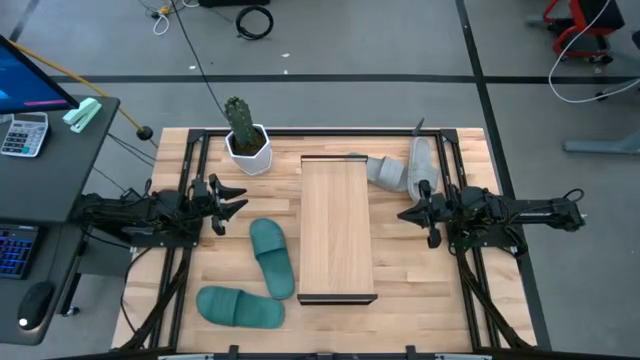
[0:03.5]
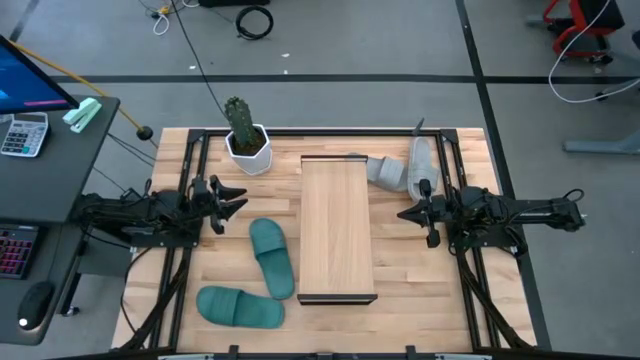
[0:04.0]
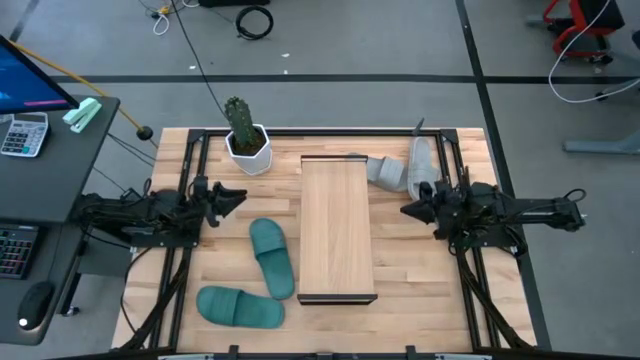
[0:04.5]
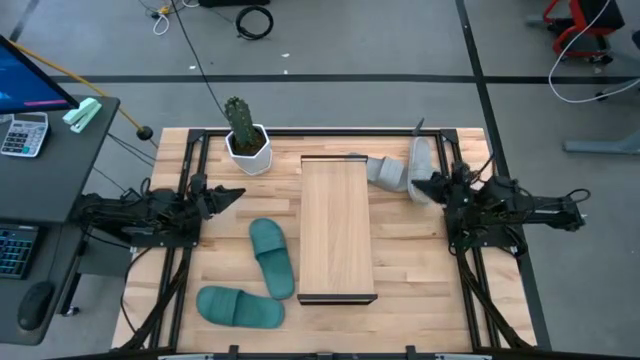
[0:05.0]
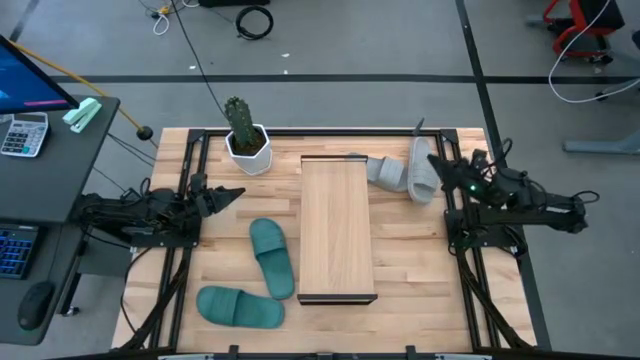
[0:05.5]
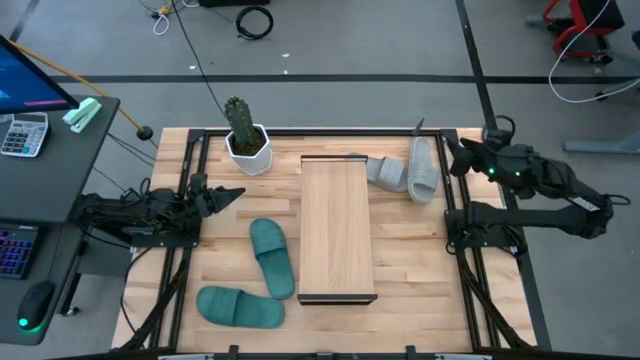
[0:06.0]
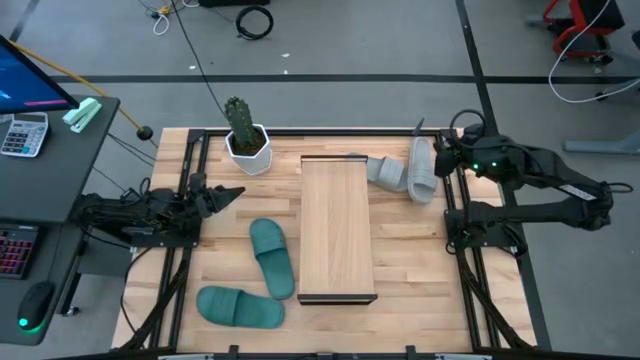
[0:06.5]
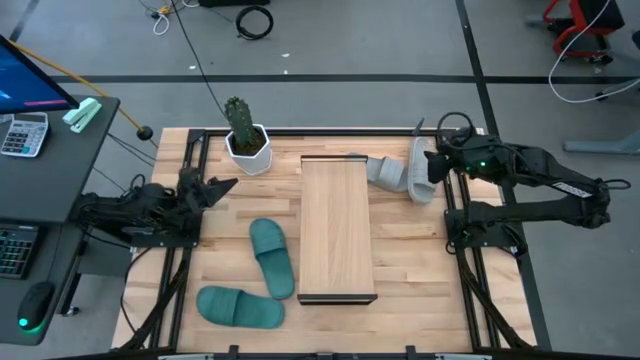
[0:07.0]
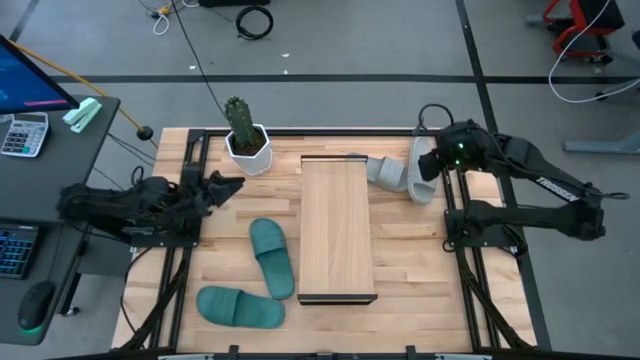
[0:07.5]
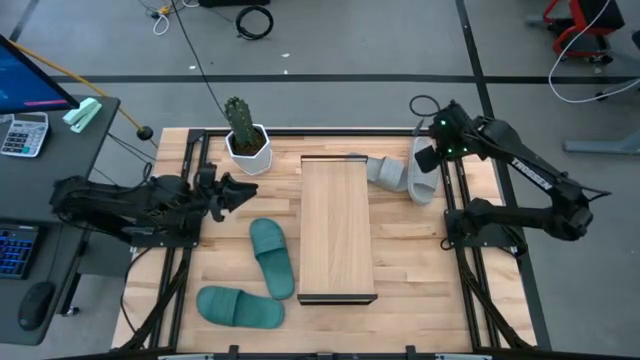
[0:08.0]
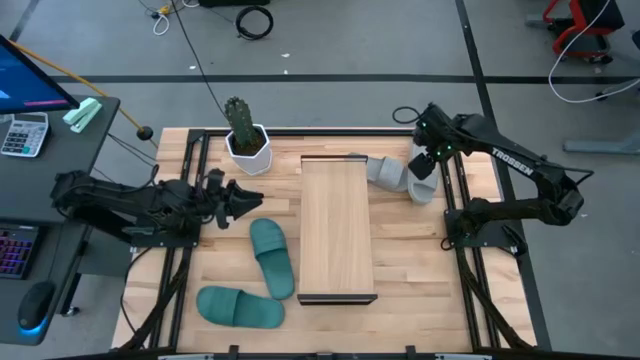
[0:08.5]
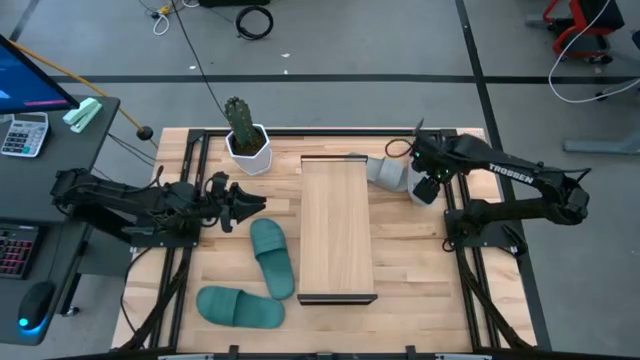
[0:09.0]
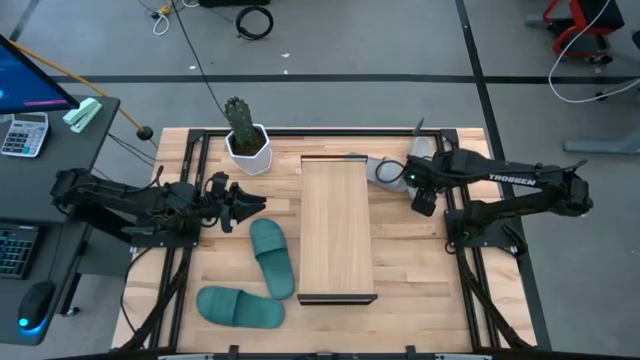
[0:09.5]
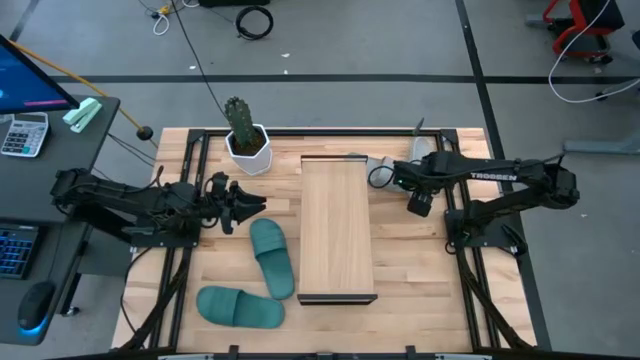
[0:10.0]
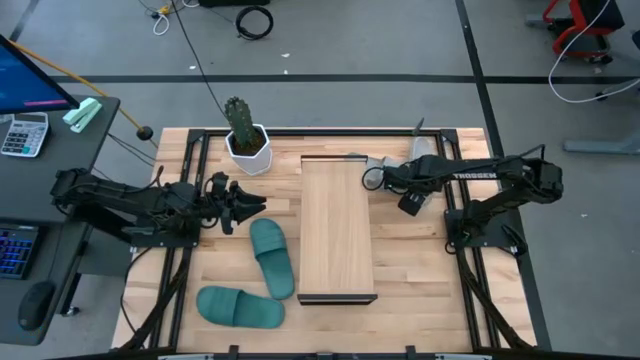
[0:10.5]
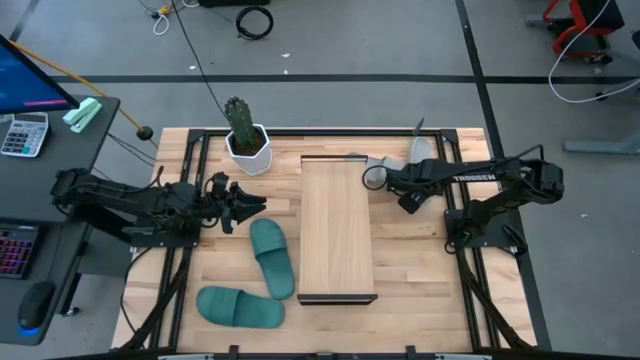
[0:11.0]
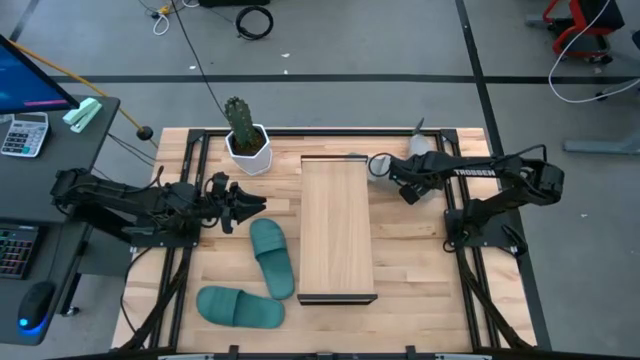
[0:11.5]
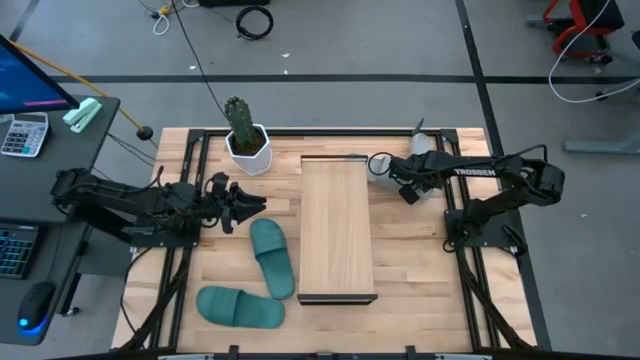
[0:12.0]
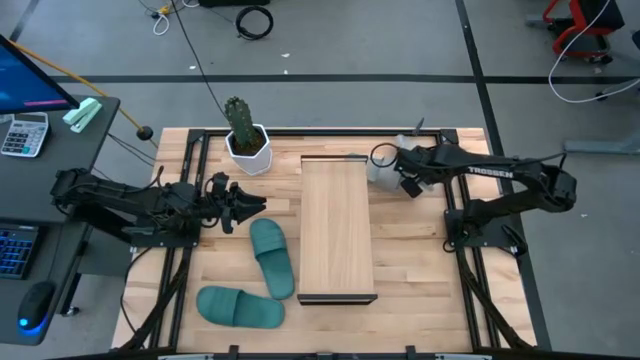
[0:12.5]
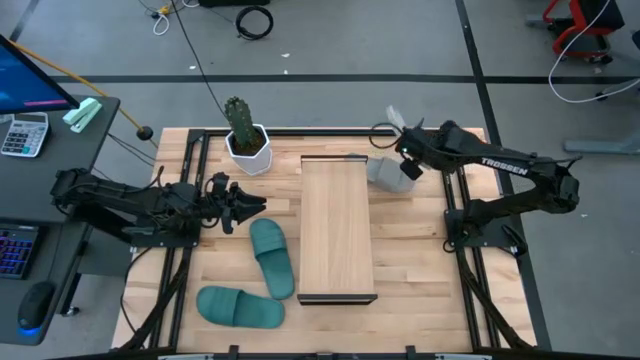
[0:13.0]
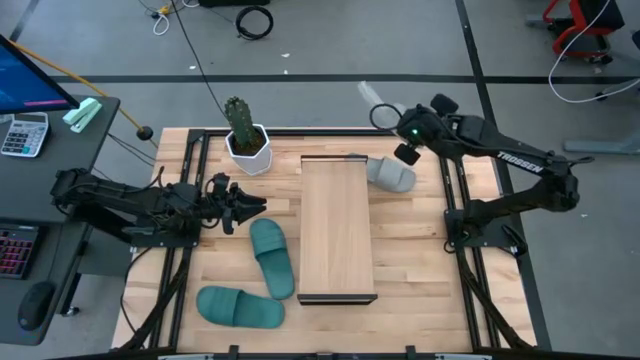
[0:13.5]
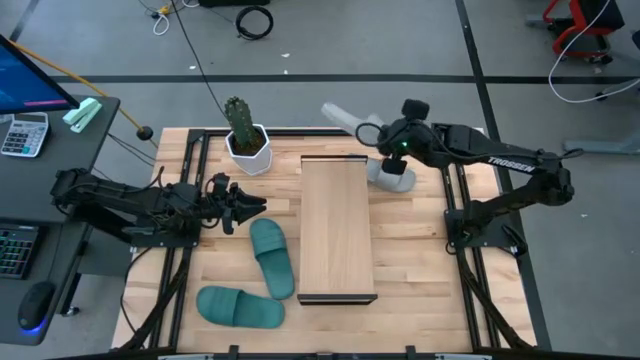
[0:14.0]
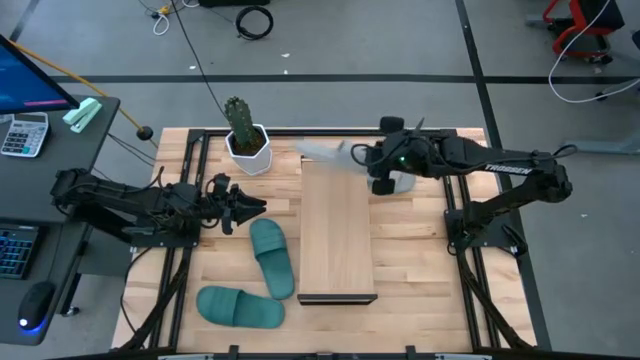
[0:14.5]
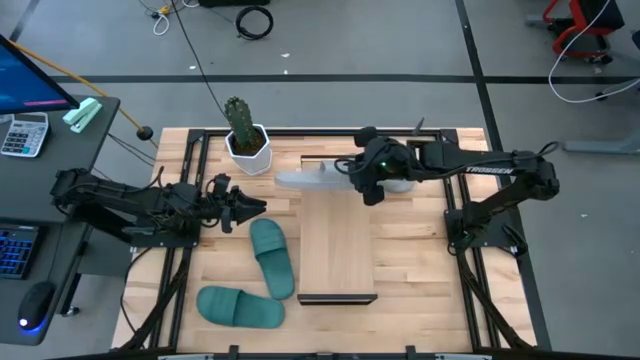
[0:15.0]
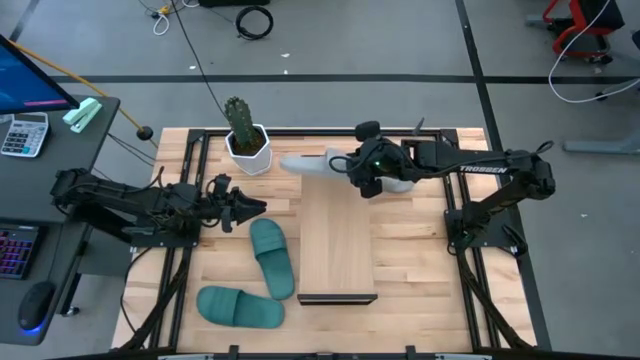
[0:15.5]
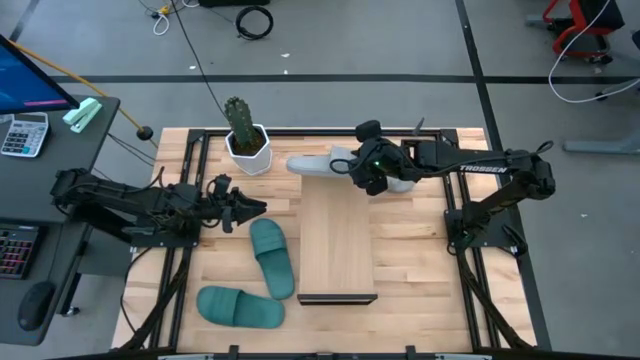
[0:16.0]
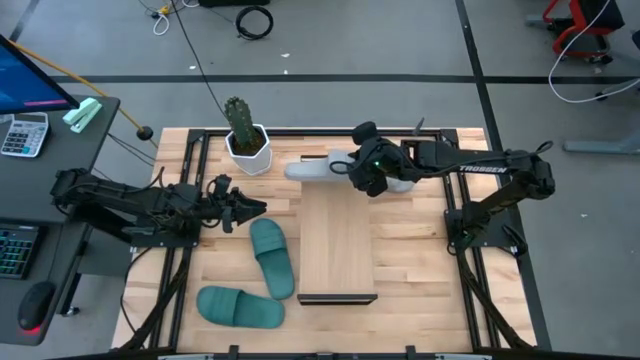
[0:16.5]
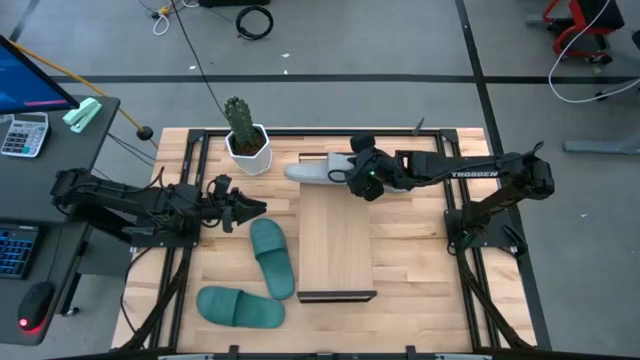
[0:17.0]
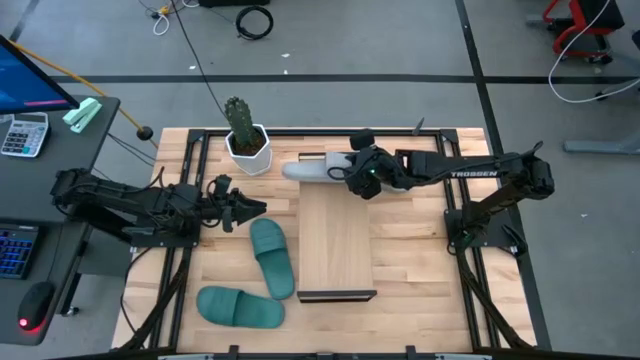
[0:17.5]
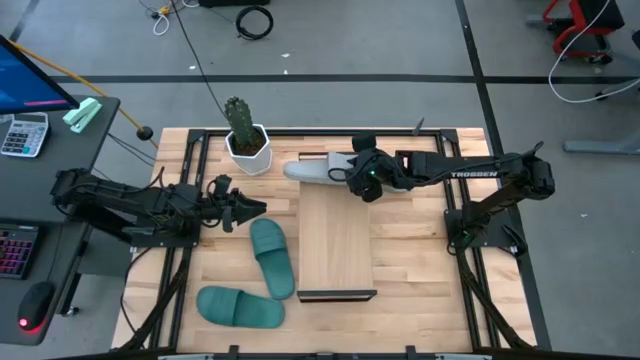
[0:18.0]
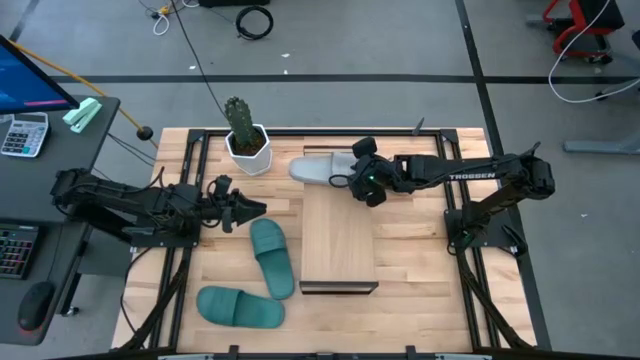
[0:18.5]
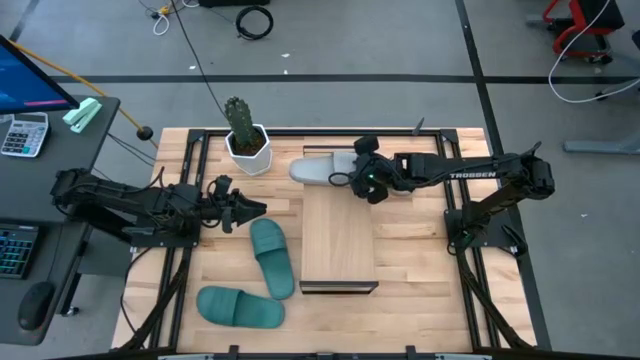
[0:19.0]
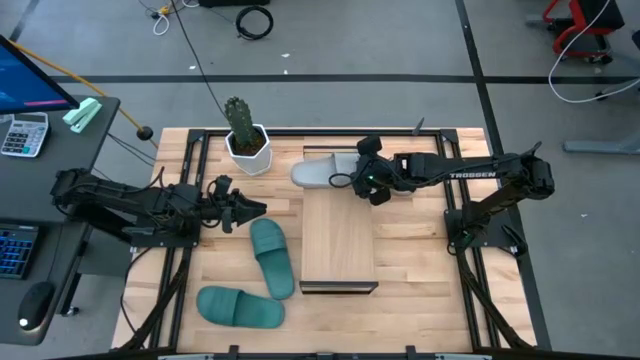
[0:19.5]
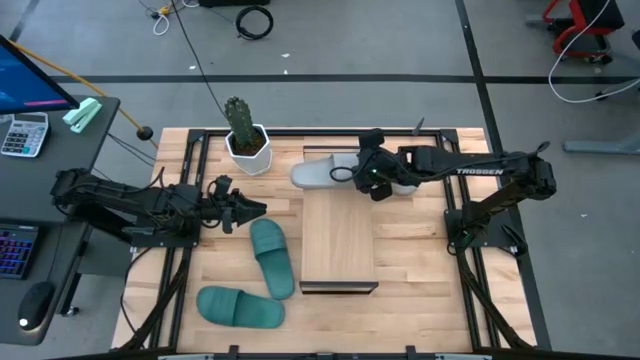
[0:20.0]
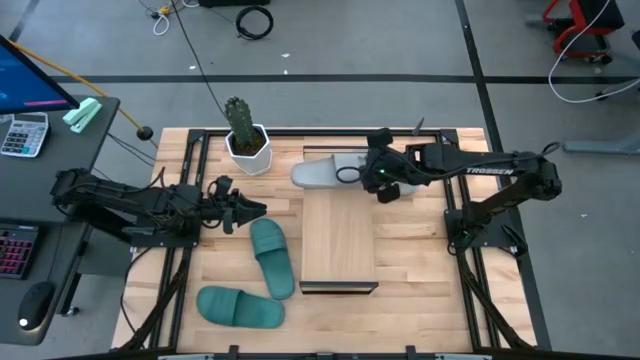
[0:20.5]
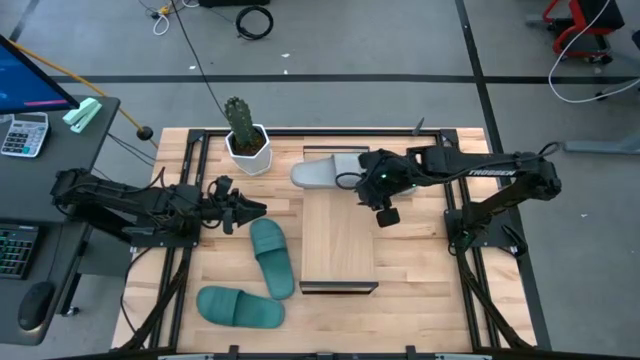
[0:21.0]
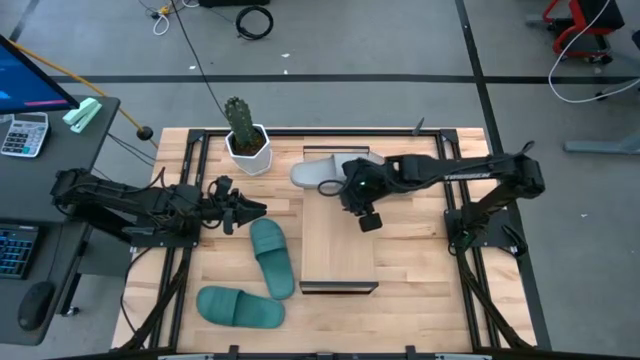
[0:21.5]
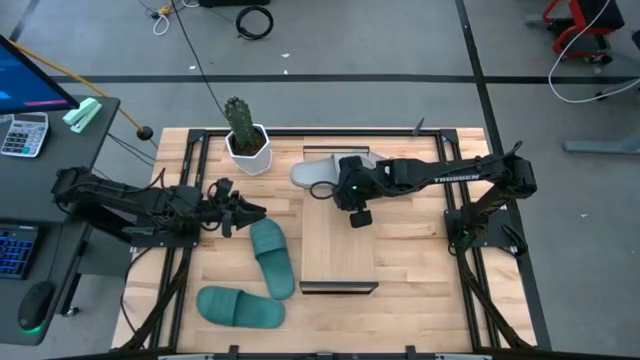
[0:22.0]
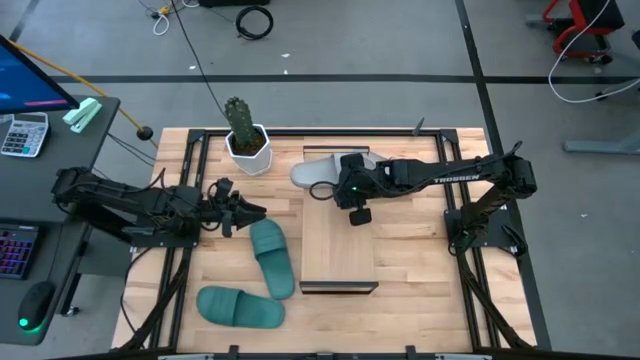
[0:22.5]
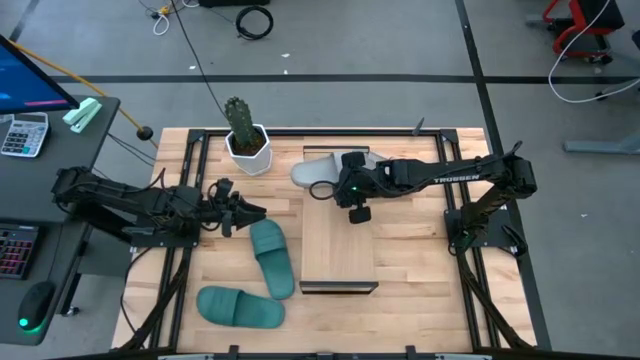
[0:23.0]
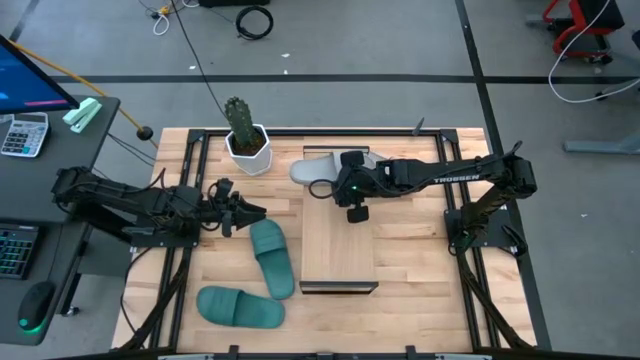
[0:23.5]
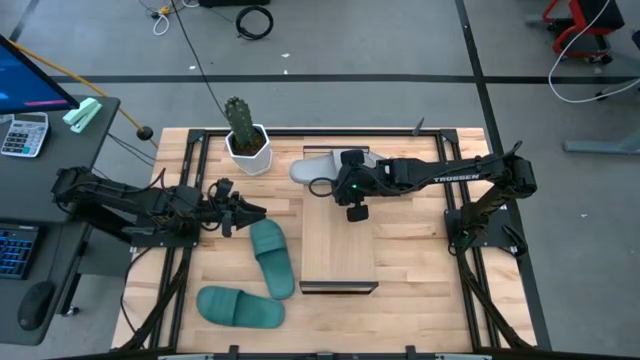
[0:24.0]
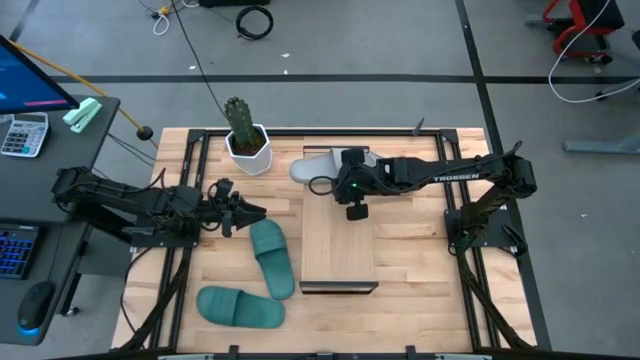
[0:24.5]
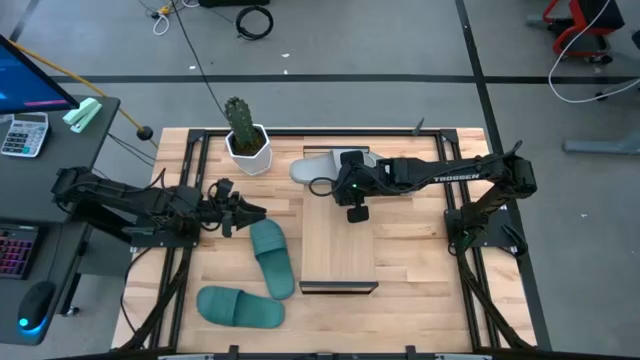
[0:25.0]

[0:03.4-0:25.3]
Task: Pick and place slides into the shelf
Put the right gray slide on the shelf
